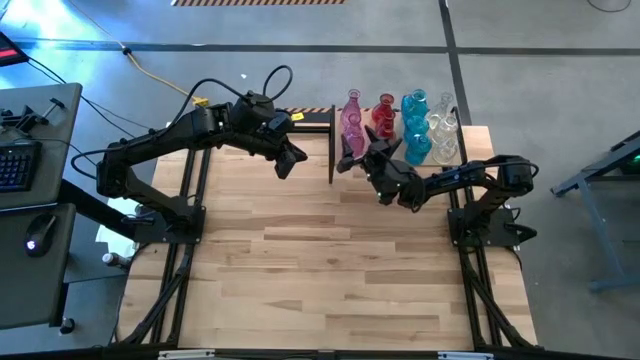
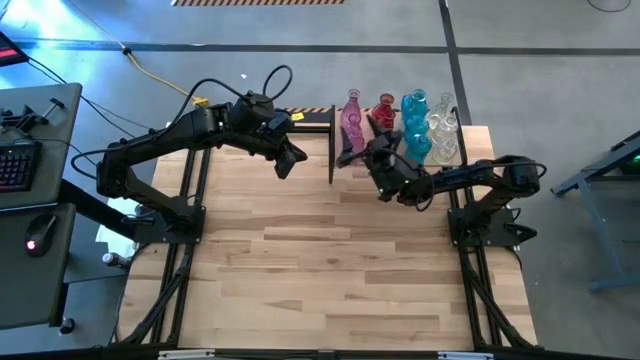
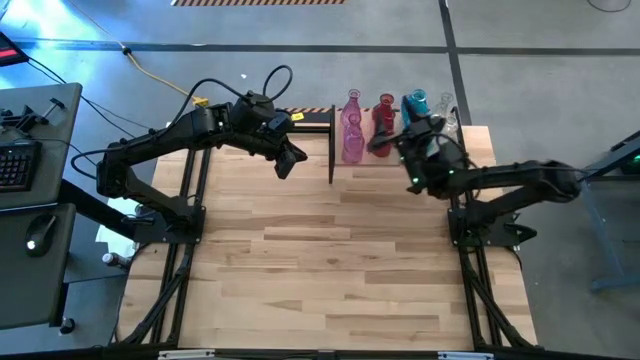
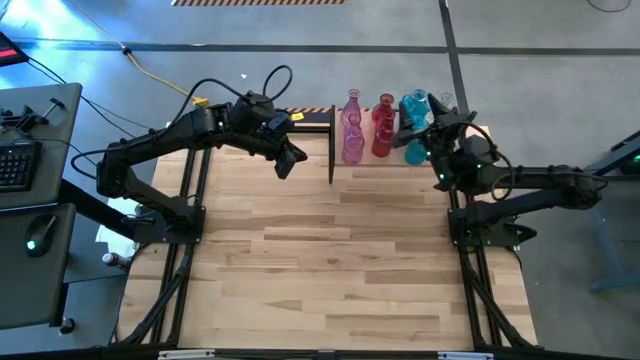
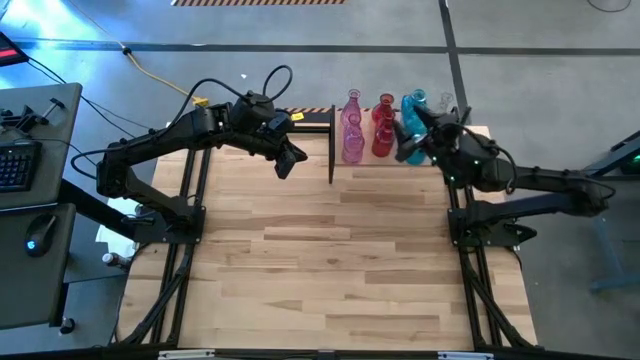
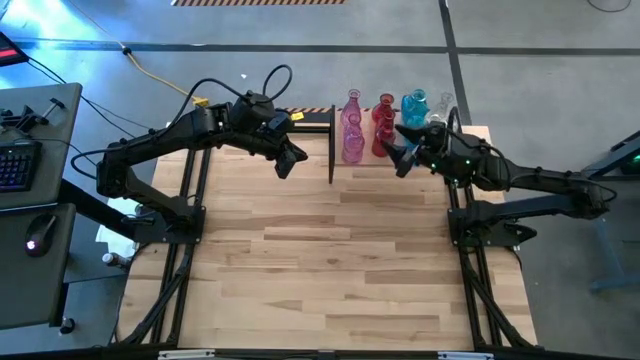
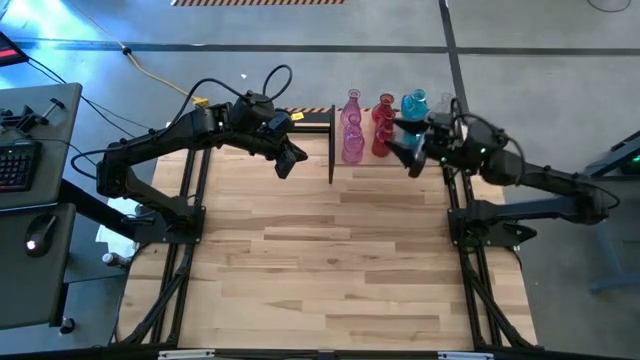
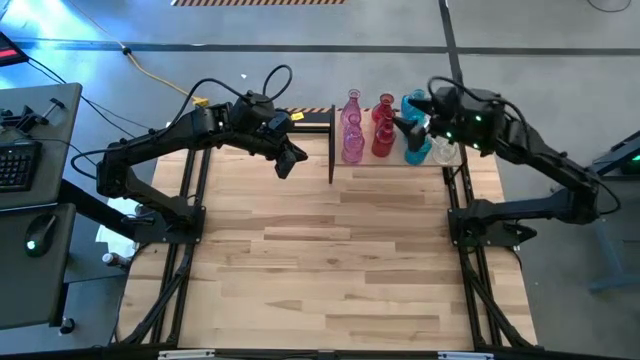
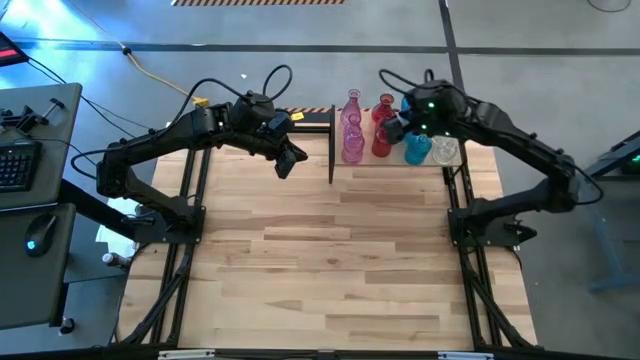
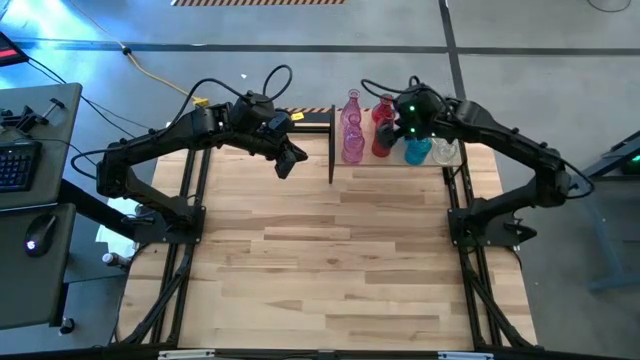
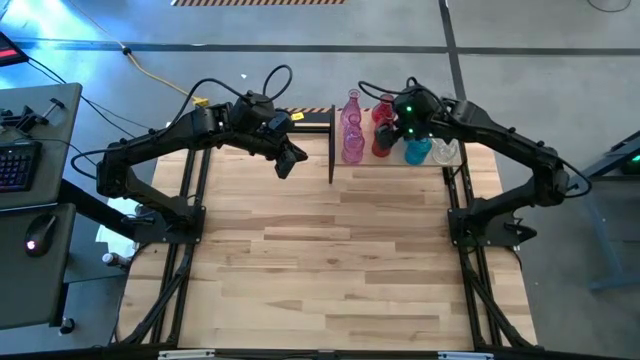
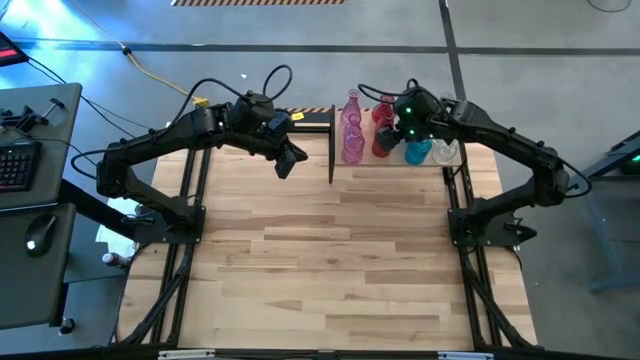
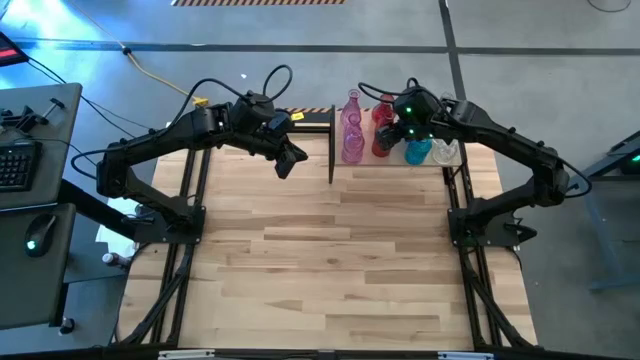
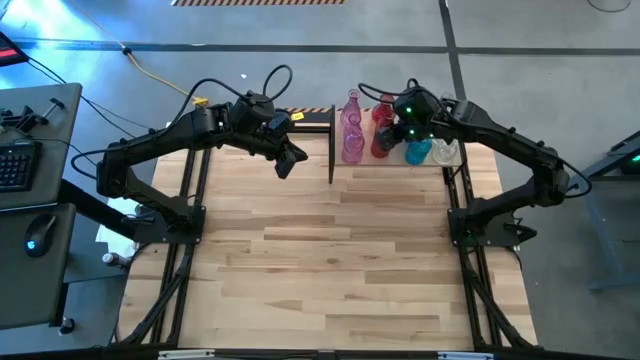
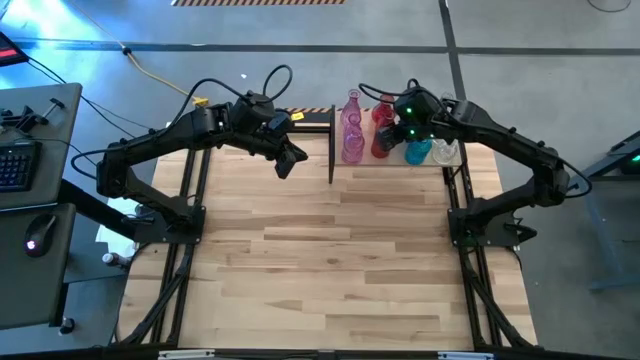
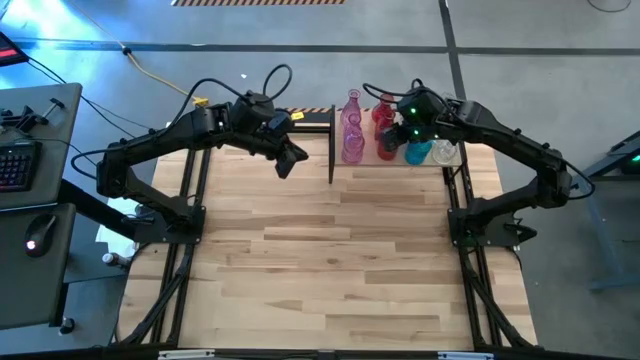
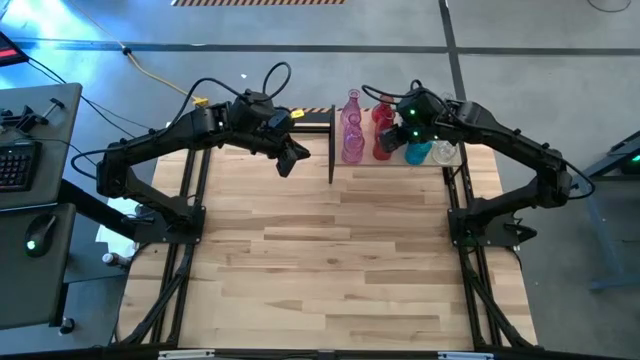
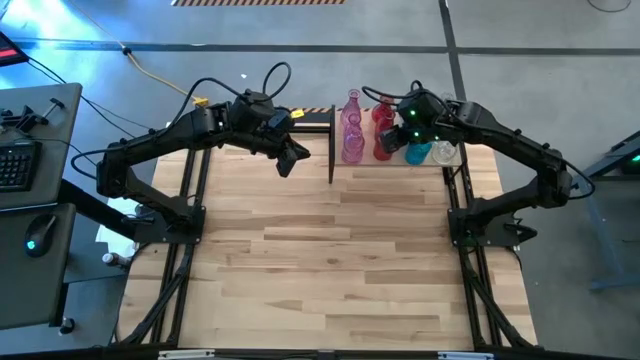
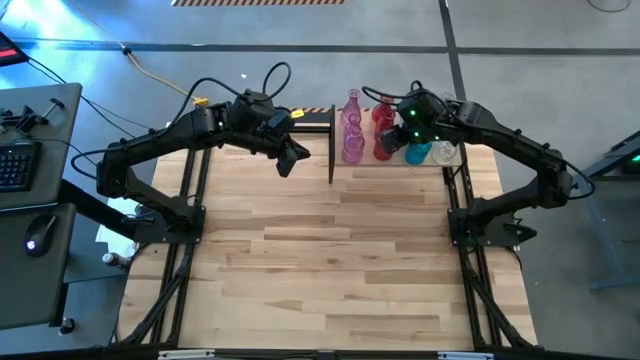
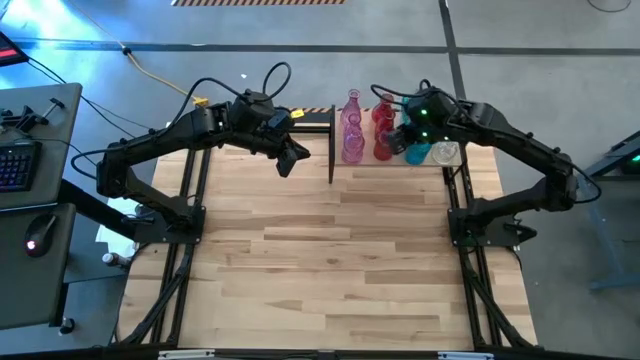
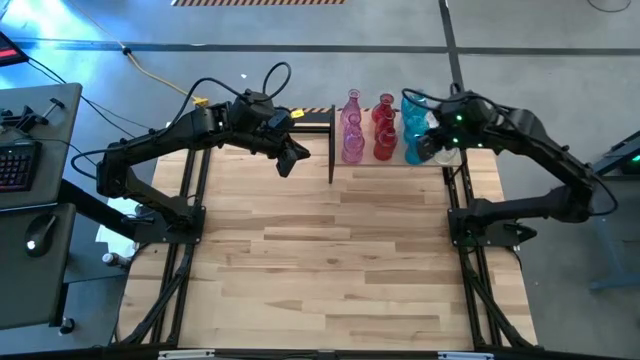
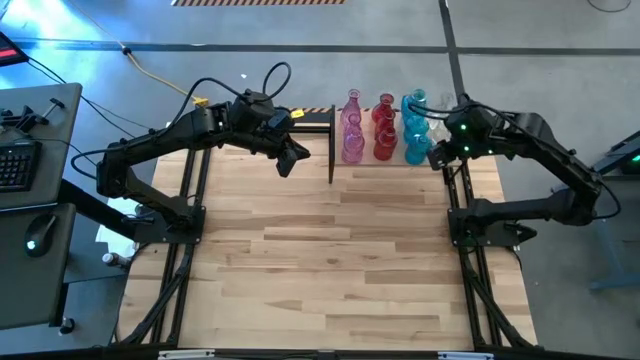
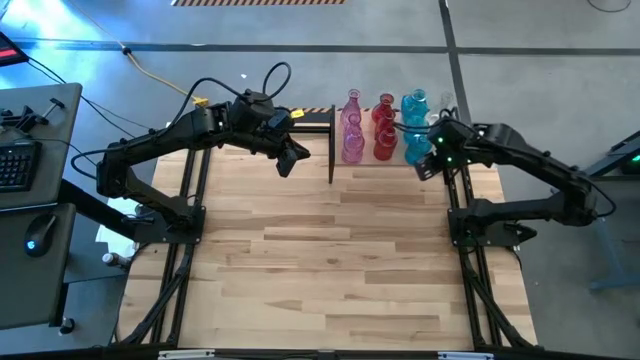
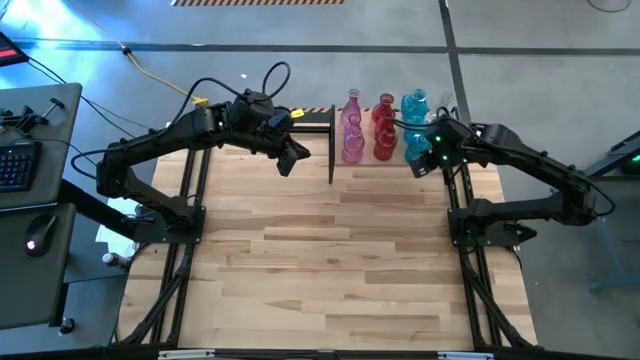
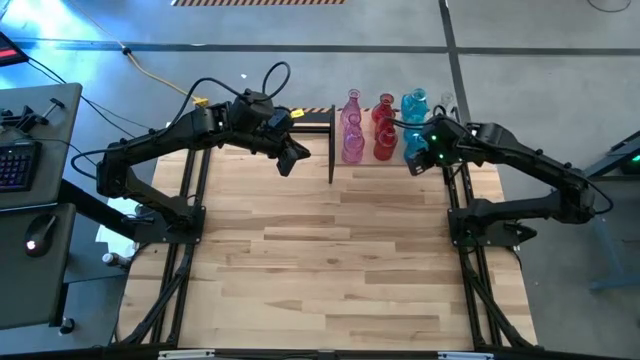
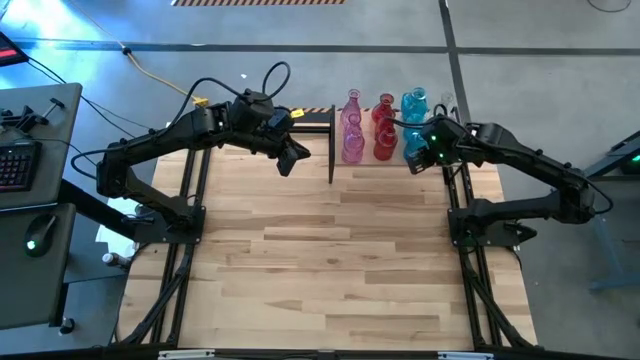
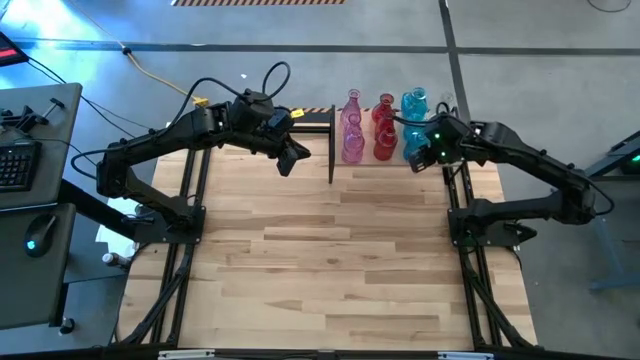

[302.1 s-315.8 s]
Task: sort vases onto shelf
Adjust the vases on the shelf

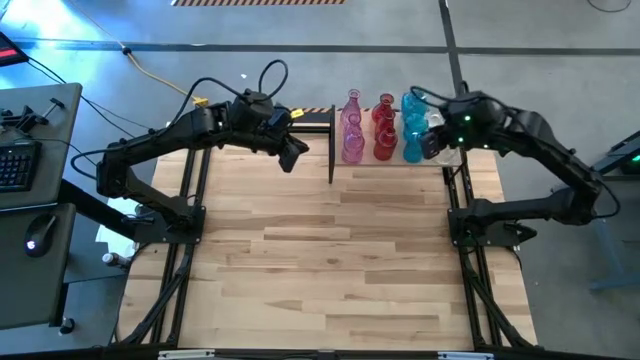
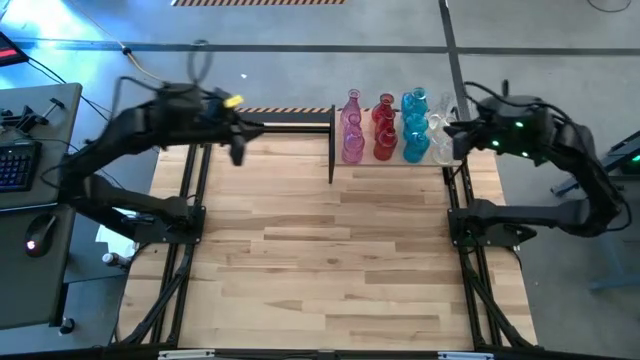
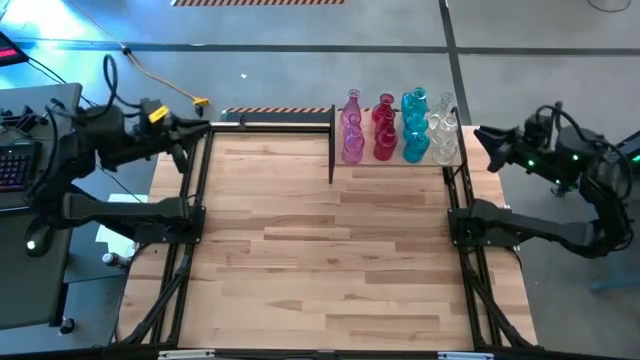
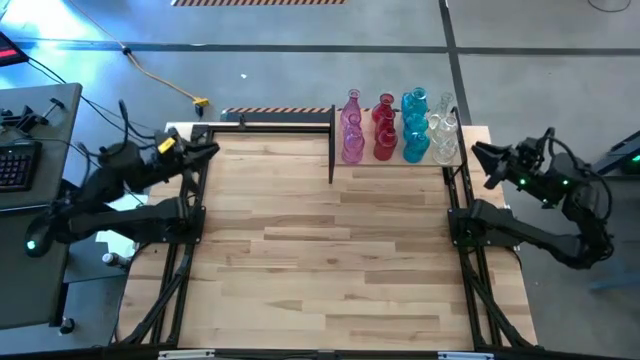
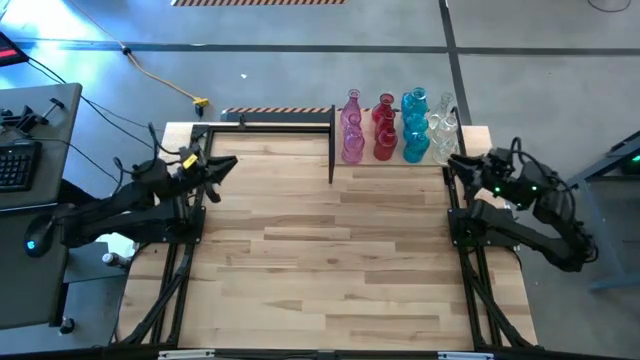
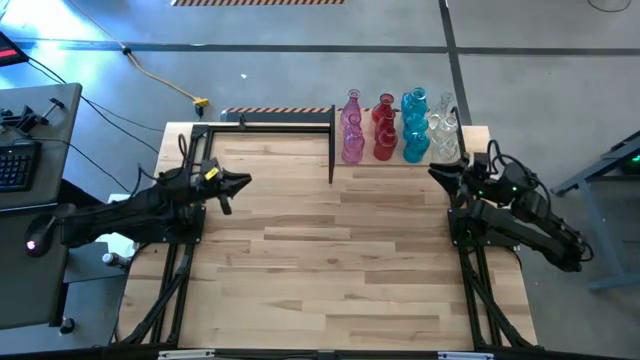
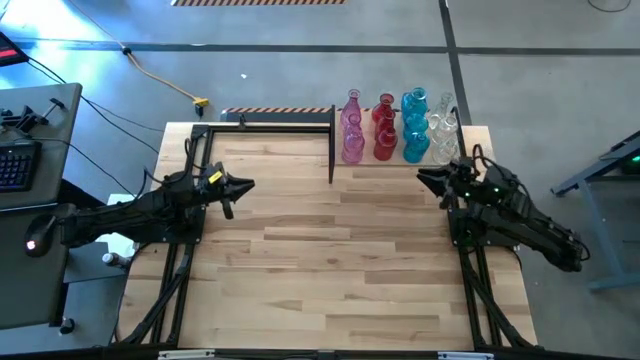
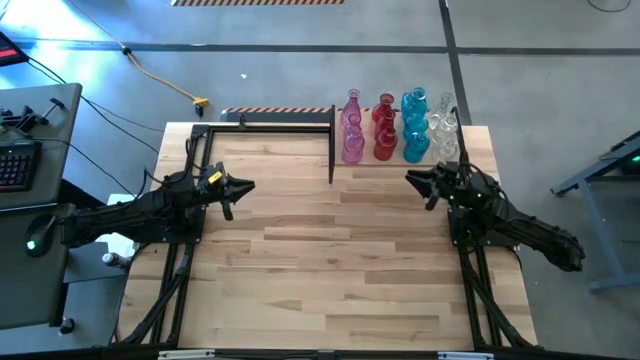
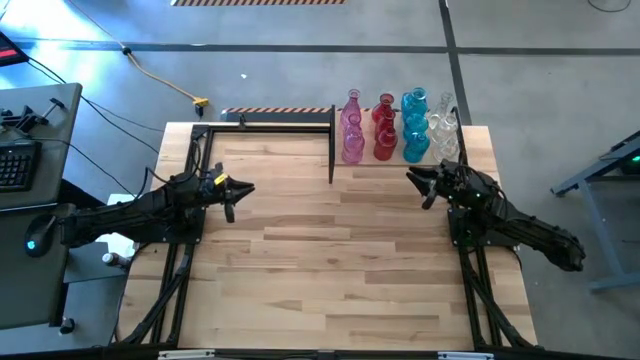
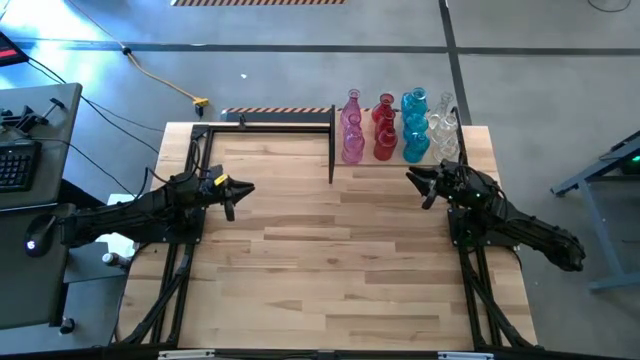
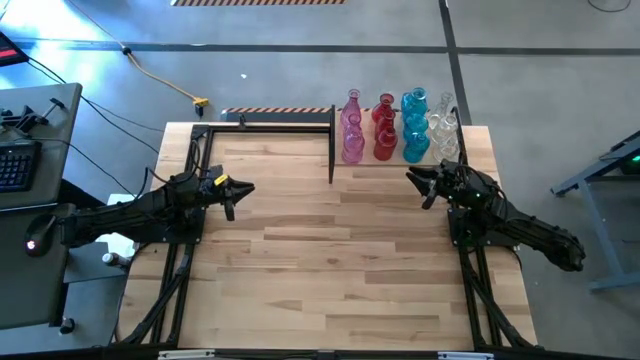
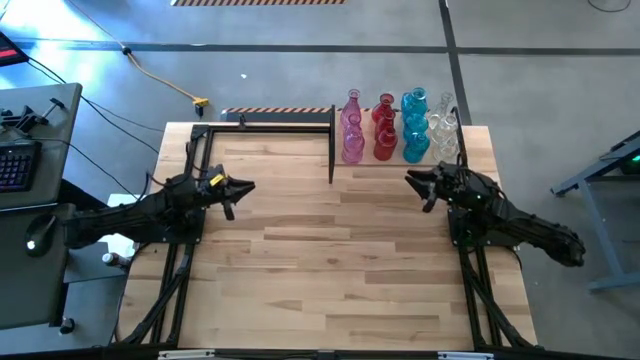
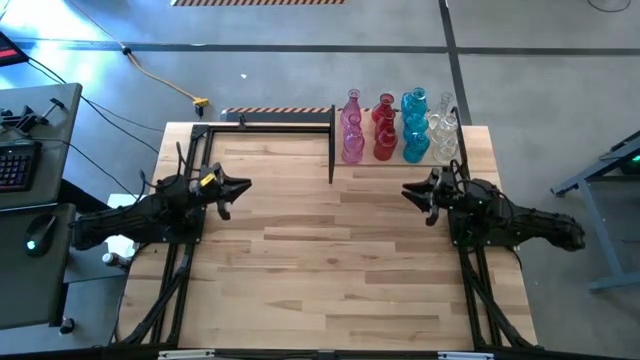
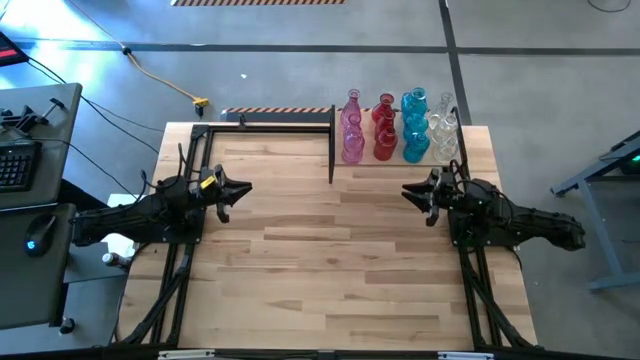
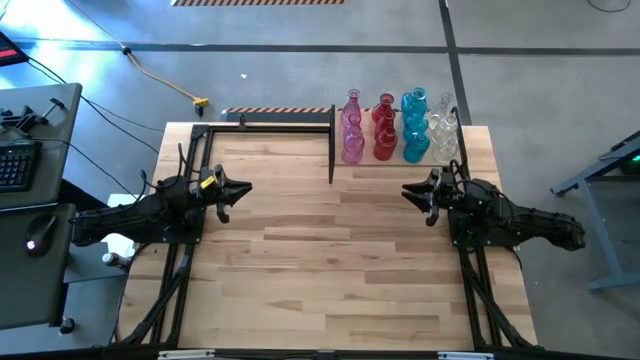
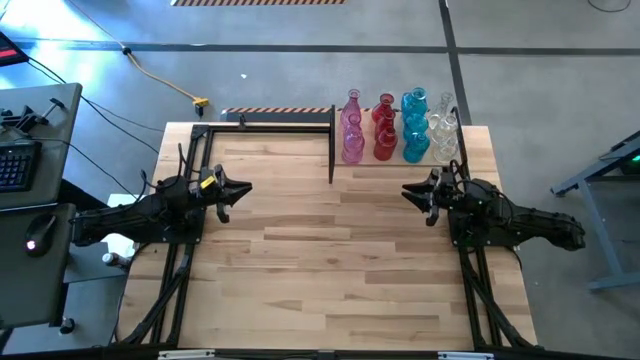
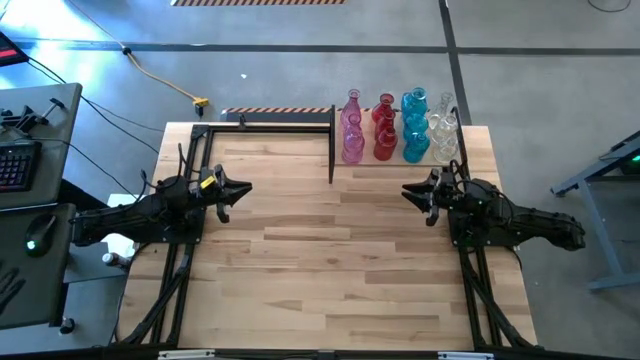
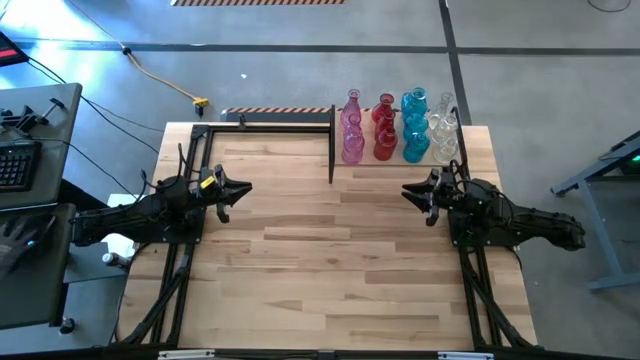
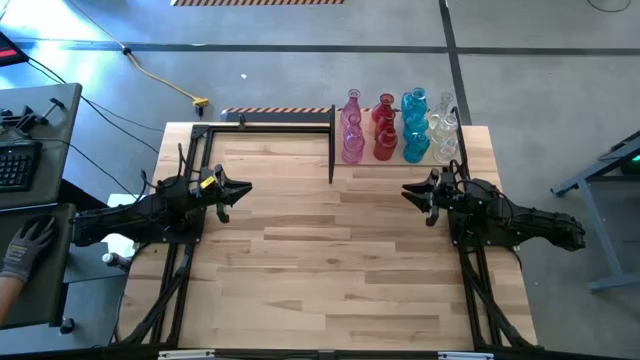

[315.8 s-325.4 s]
Return to Home Position
